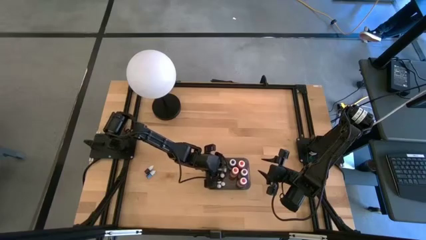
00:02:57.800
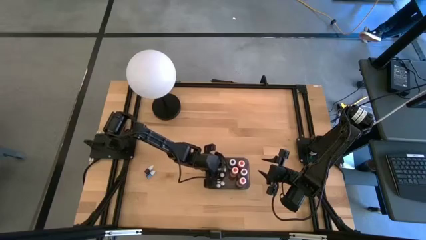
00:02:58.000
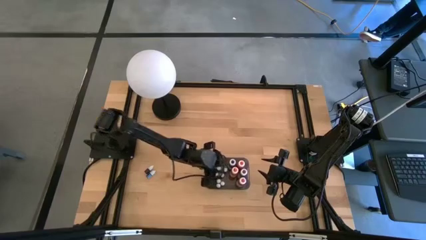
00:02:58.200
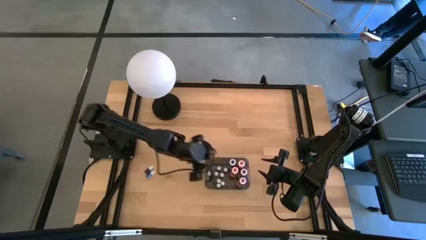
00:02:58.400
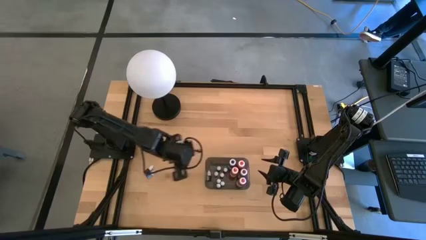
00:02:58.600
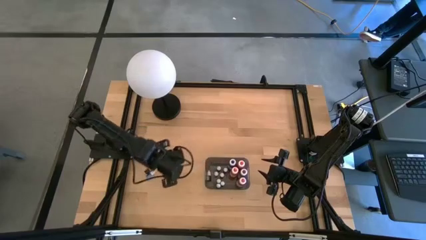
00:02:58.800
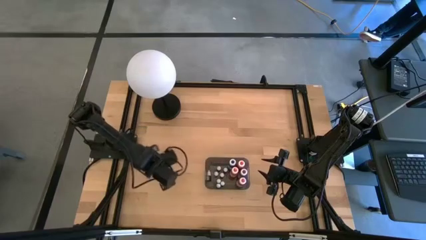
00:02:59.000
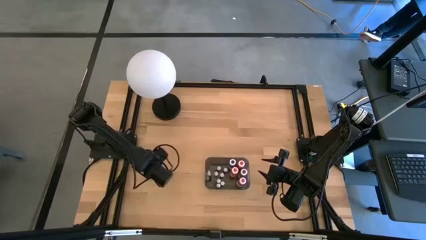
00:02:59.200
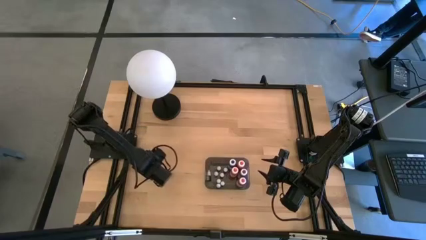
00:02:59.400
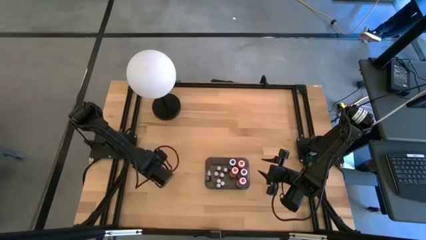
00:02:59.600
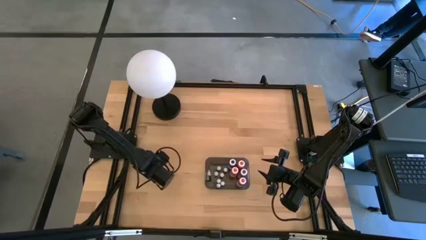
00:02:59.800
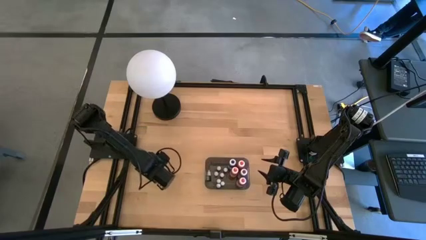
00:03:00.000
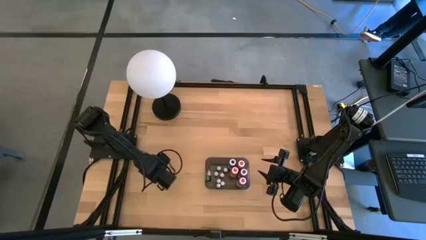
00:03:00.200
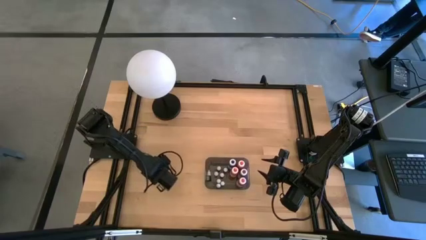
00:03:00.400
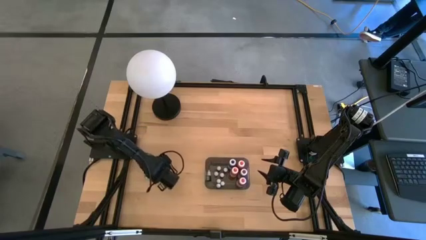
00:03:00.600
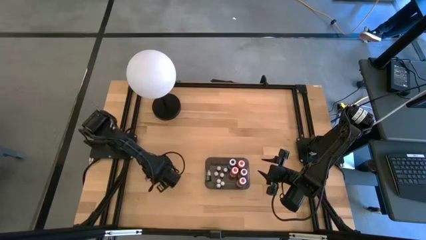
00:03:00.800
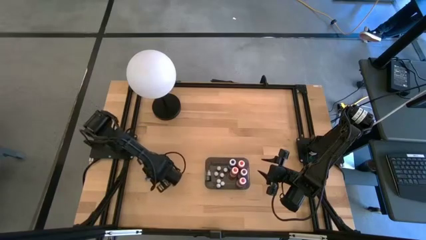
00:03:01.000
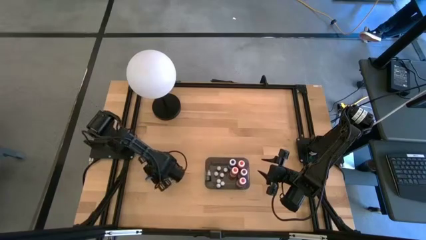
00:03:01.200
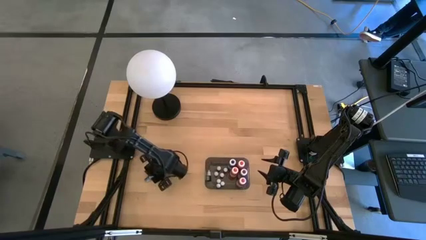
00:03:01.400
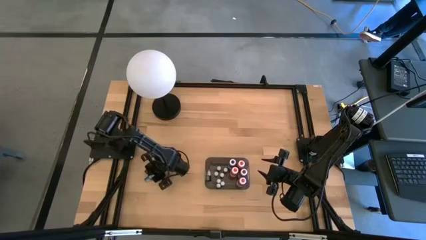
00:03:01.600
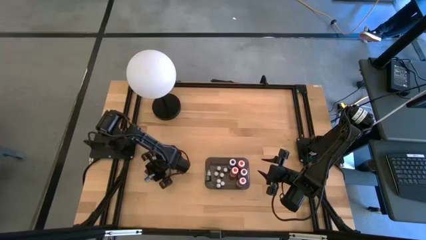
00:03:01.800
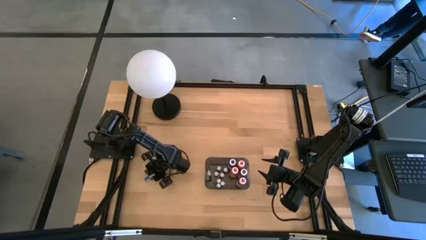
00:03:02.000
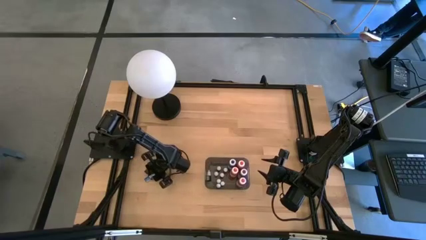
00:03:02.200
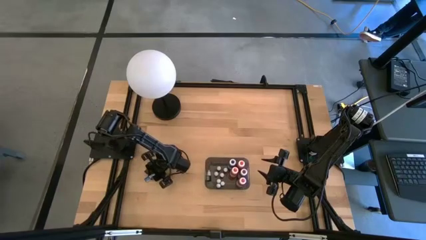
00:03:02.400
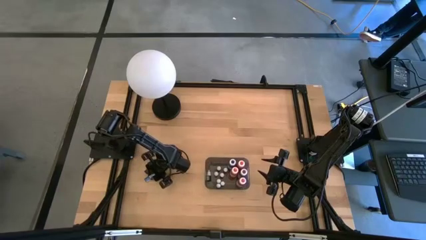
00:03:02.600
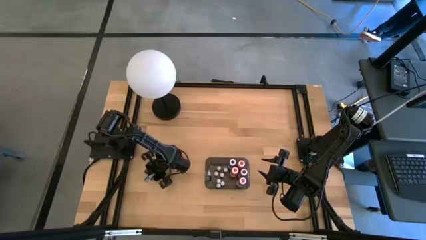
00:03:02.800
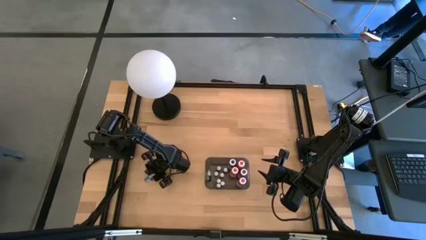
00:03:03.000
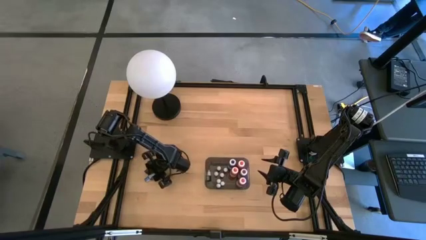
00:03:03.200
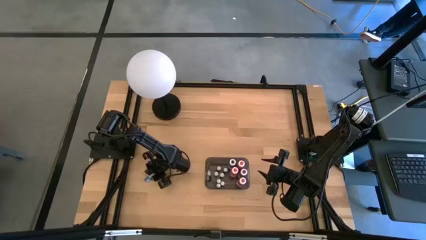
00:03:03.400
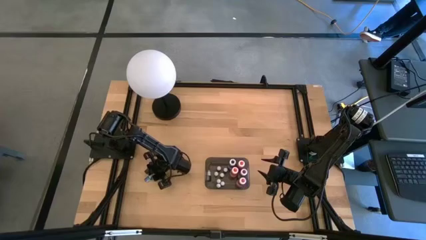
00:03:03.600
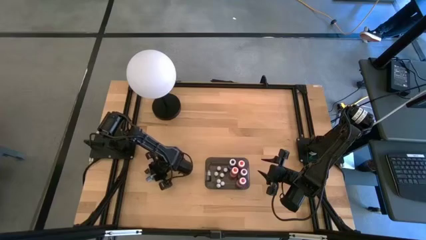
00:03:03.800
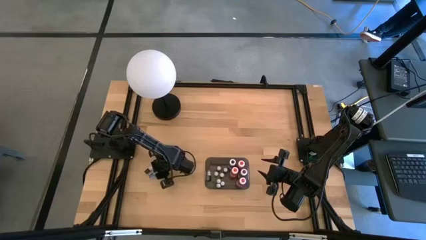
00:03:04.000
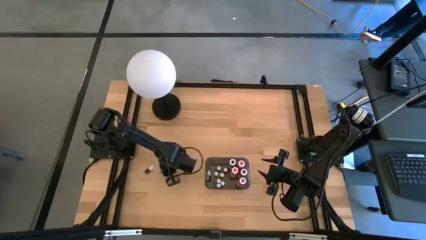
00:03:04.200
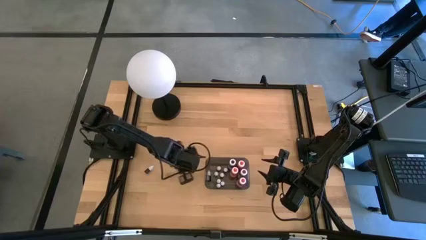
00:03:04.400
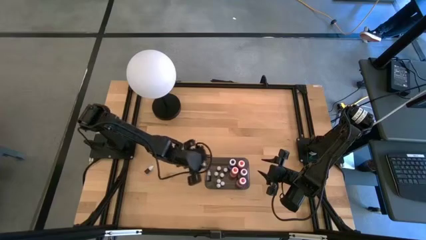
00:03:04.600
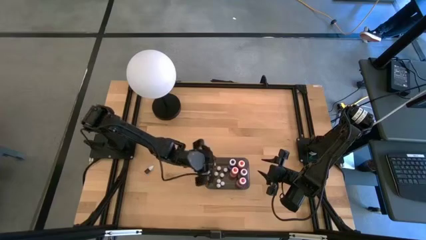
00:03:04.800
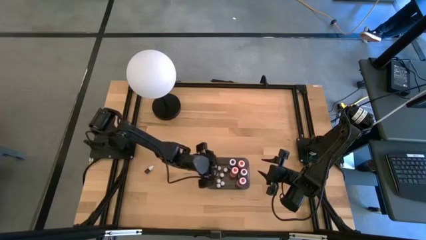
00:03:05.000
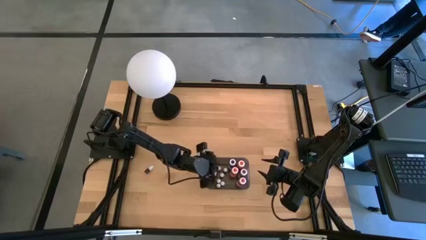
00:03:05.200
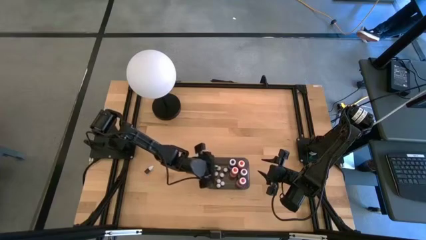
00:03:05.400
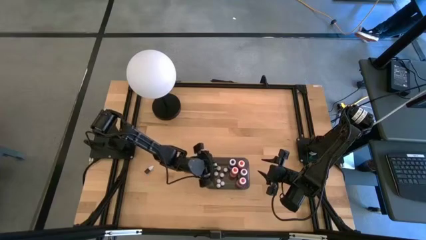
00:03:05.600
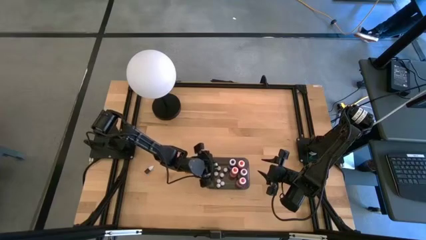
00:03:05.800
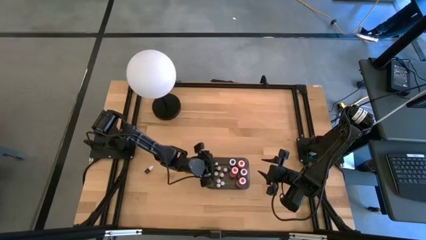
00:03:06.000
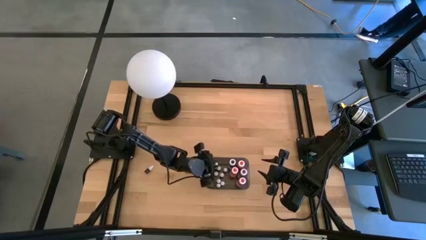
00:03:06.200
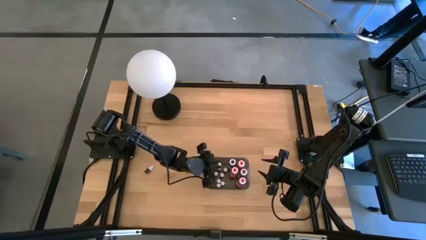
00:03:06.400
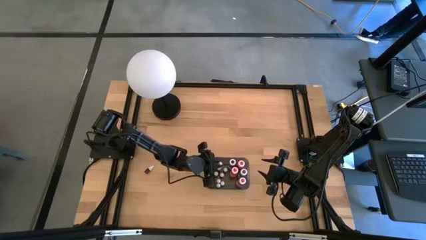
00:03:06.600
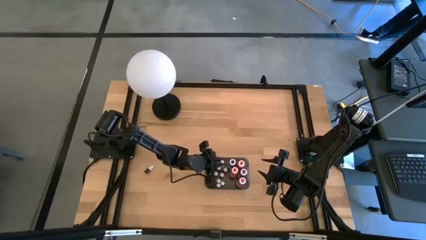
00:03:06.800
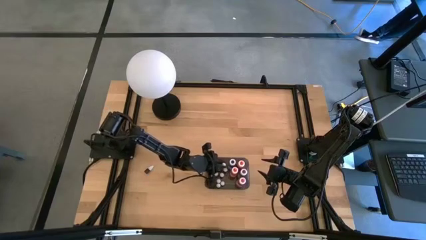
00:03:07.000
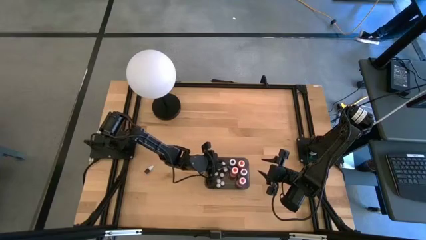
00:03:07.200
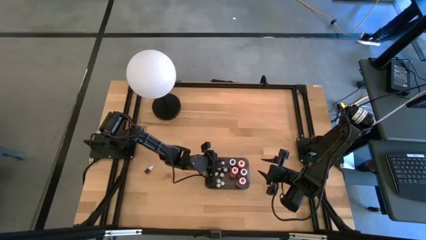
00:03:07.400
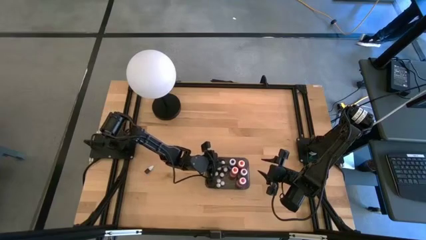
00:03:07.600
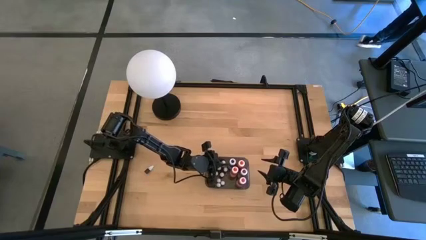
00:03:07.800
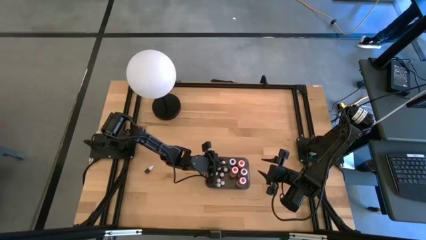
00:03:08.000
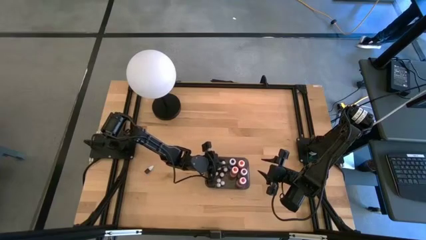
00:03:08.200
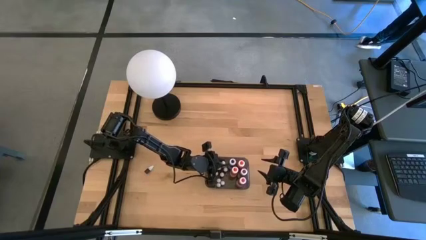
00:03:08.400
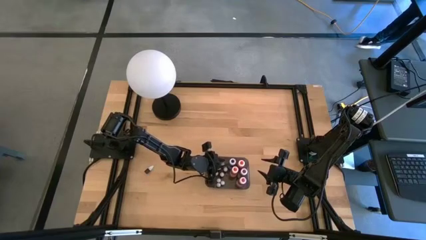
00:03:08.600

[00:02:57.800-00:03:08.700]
Task: Pick & Place food coloring
Put the small food coloring bottle into the black bin

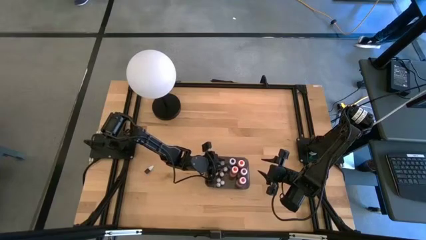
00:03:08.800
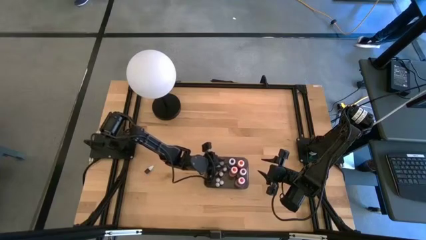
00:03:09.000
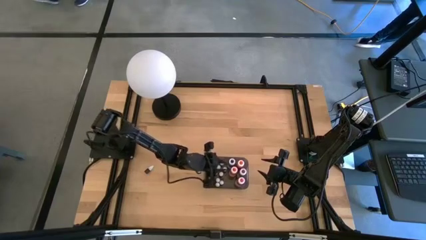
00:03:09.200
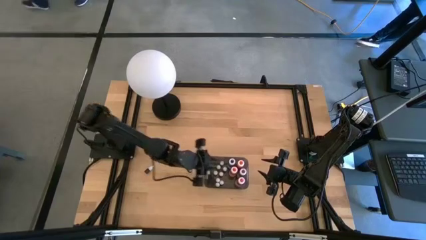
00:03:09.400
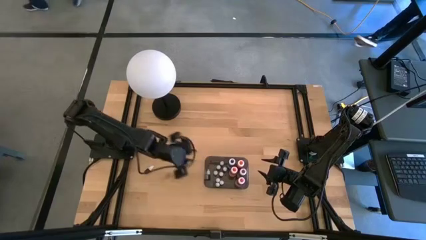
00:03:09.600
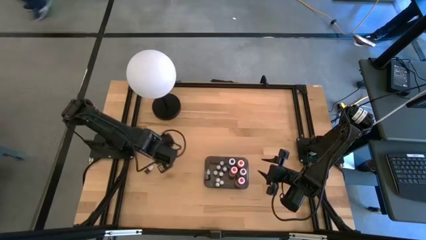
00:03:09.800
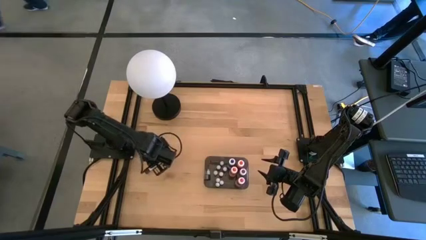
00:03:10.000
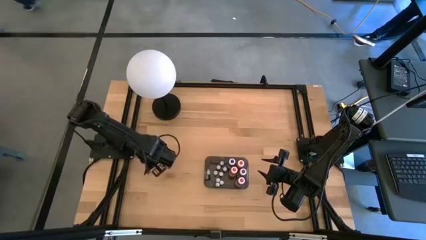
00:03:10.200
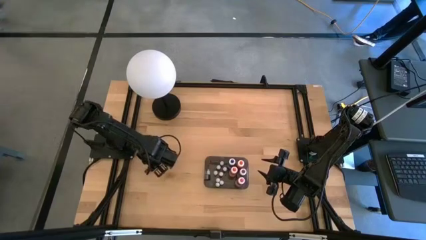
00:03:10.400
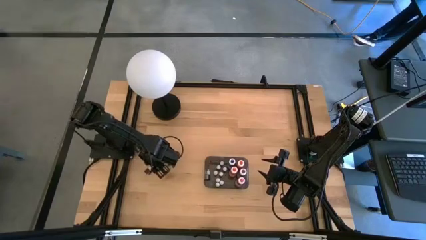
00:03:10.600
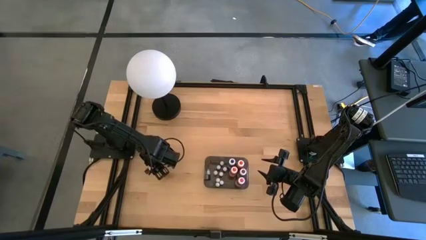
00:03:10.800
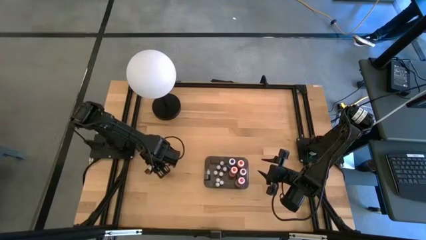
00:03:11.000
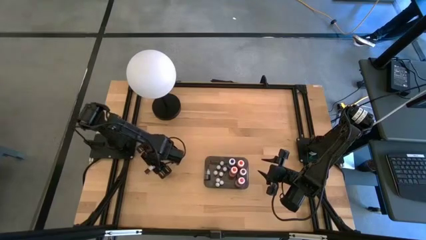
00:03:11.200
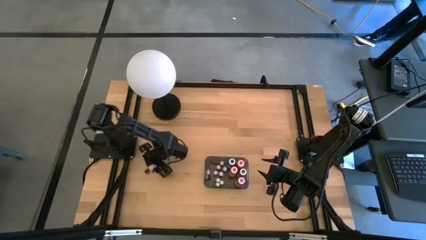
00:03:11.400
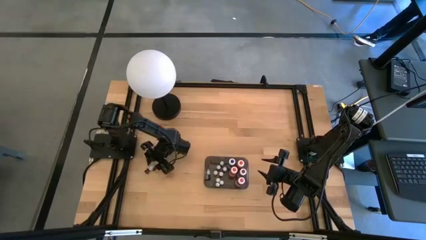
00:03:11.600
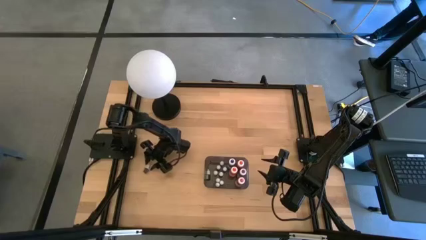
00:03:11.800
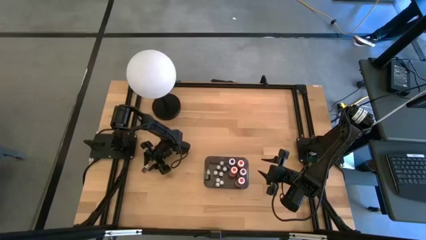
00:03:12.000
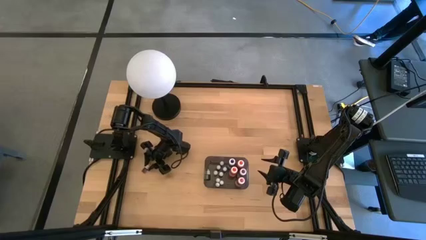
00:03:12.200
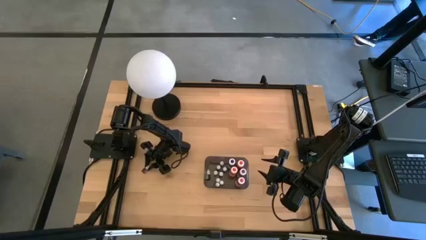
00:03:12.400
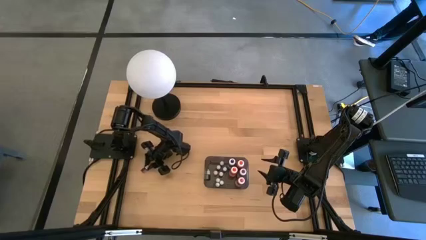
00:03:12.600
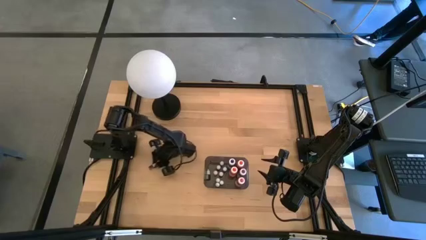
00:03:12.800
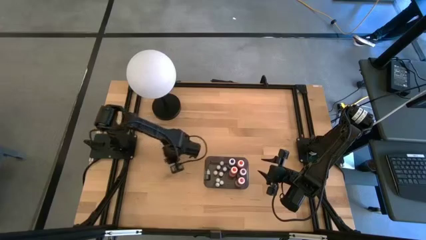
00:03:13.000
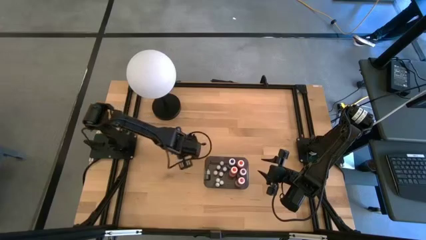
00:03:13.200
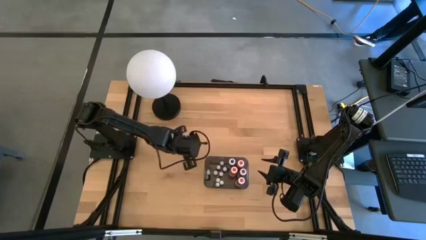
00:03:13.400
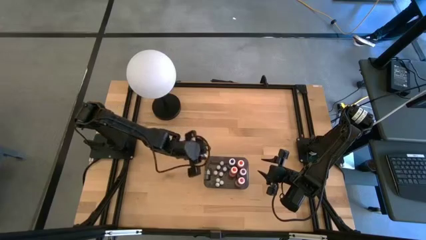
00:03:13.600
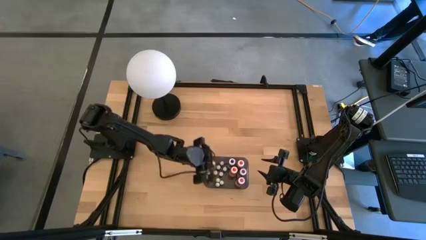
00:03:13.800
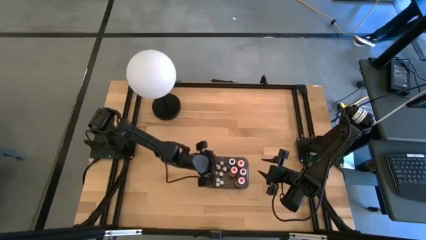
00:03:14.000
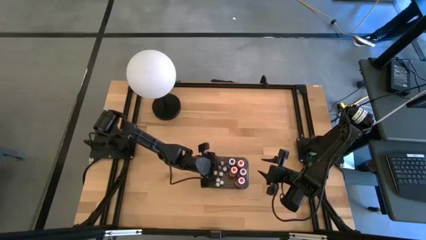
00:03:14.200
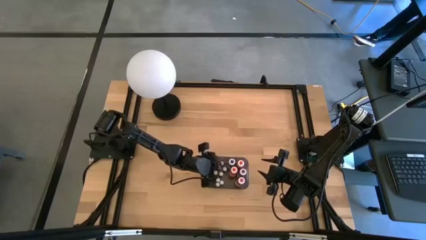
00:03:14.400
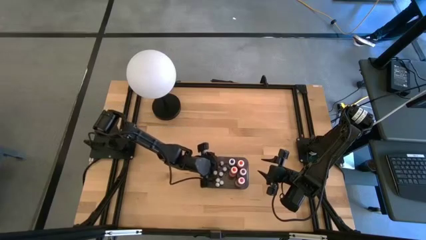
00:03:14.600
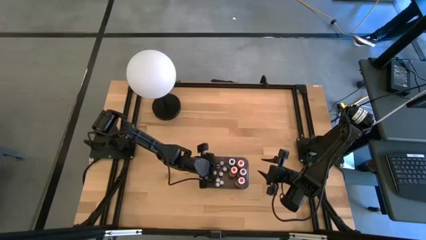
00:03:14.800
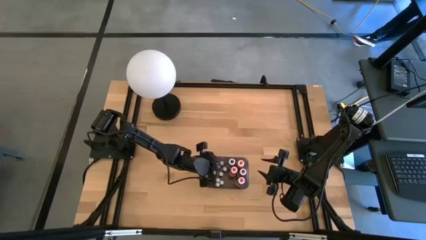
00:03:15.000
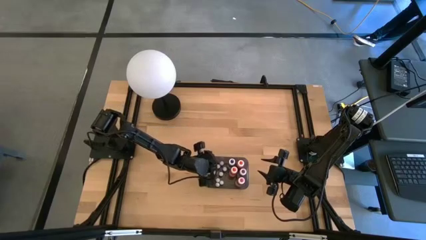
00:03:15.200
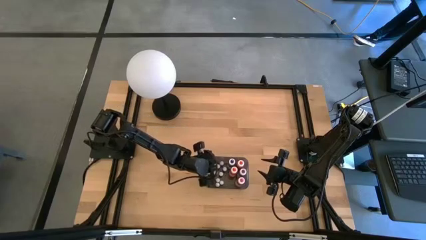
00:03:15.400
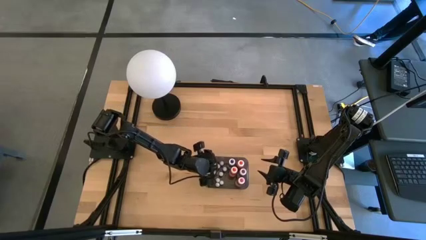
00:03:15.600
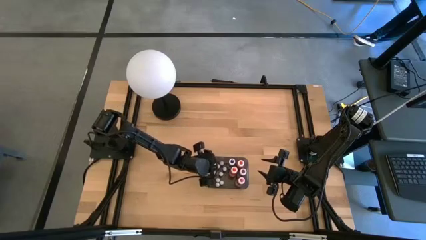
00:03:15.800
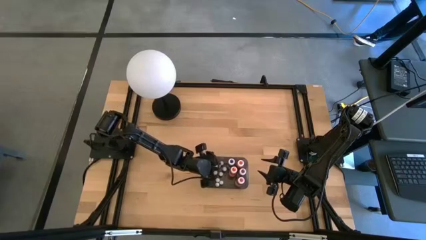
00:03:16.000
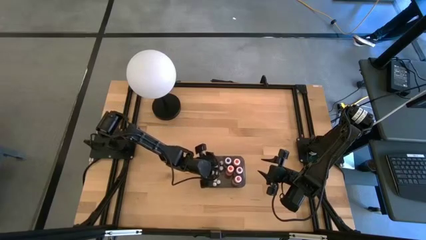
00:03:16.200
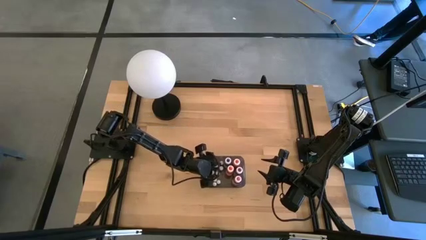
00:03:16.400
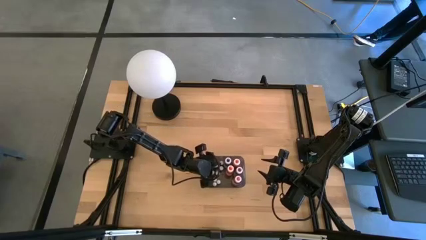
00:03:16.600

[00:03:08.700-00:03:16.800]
Put the small food coloring bottle into the black bin
